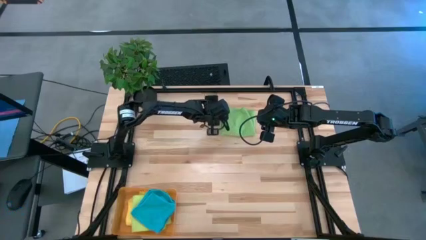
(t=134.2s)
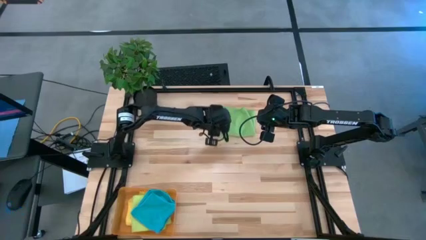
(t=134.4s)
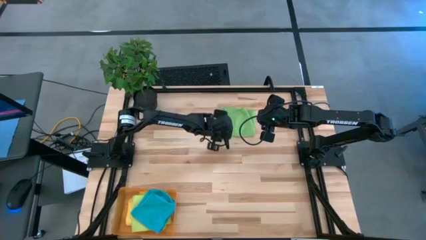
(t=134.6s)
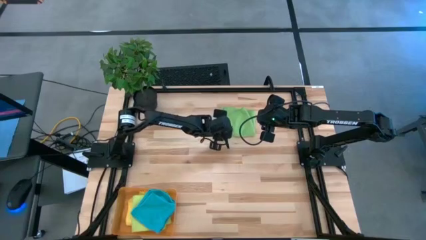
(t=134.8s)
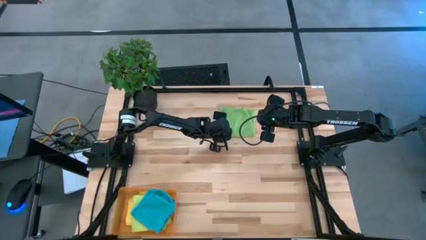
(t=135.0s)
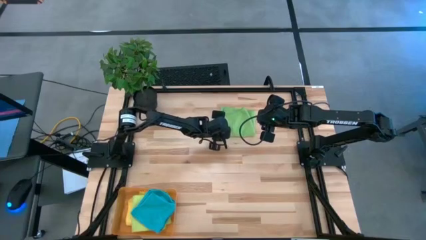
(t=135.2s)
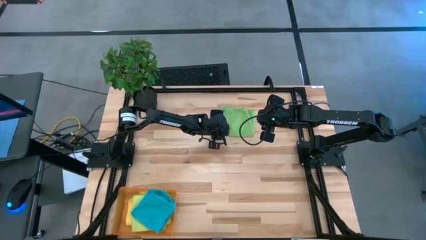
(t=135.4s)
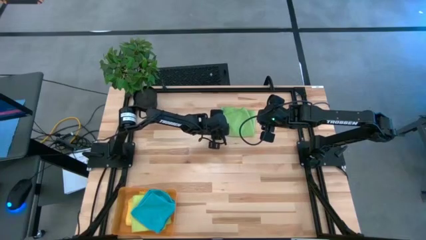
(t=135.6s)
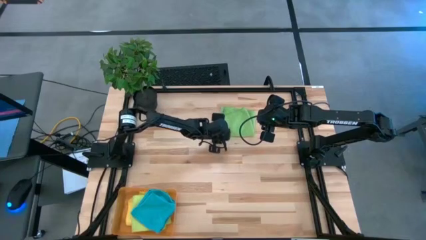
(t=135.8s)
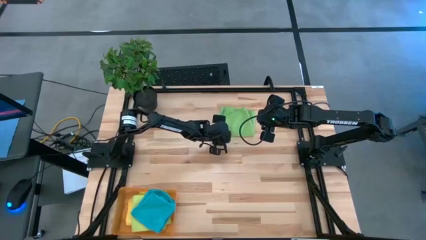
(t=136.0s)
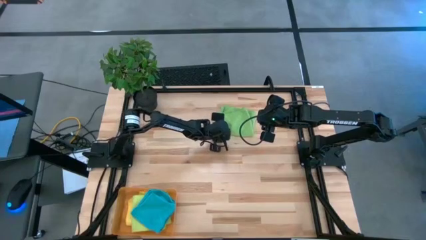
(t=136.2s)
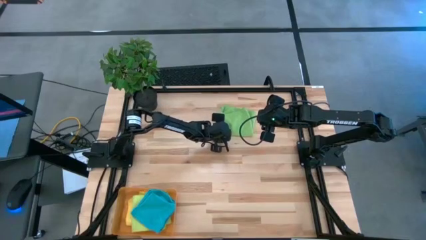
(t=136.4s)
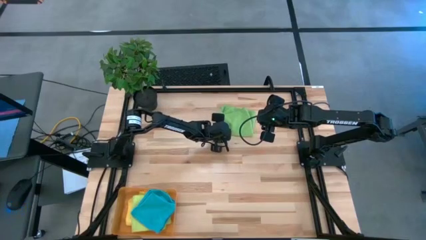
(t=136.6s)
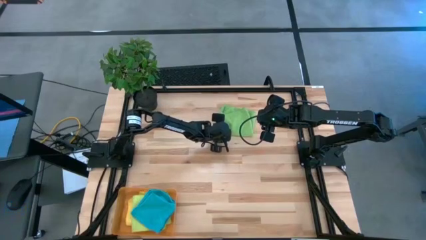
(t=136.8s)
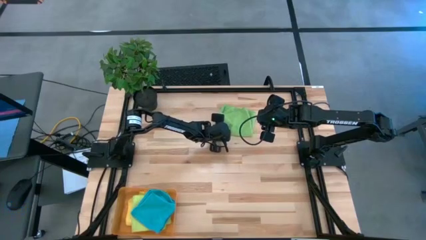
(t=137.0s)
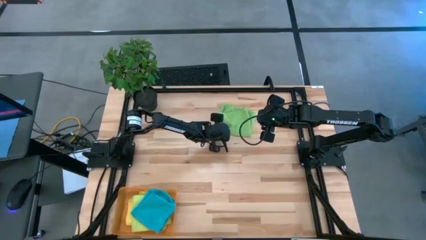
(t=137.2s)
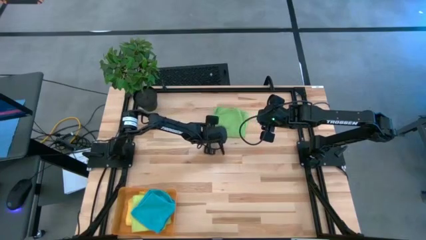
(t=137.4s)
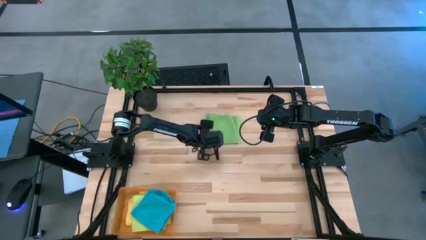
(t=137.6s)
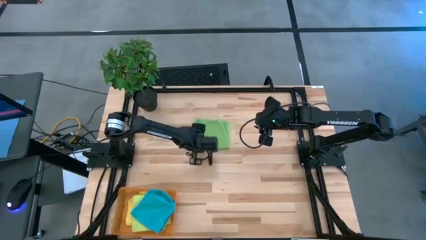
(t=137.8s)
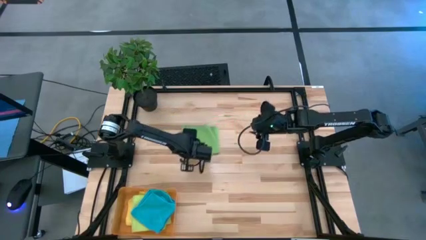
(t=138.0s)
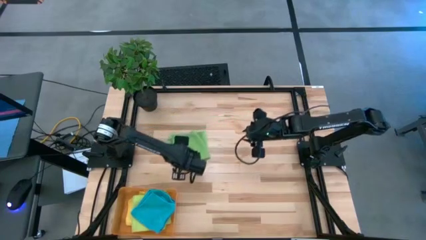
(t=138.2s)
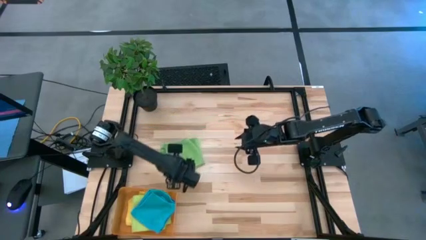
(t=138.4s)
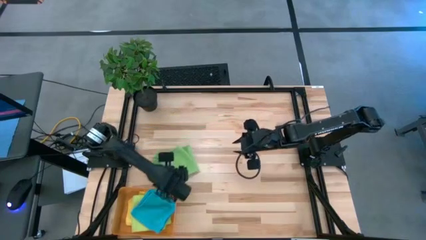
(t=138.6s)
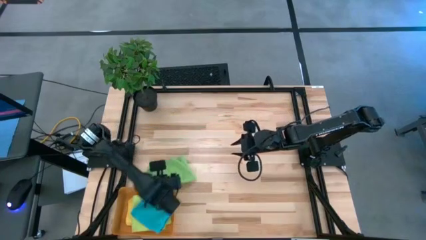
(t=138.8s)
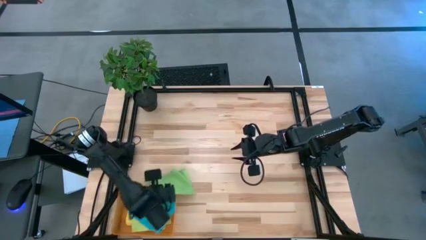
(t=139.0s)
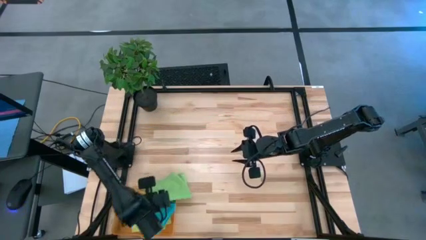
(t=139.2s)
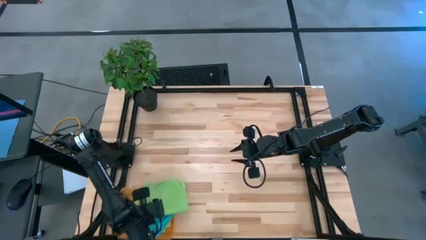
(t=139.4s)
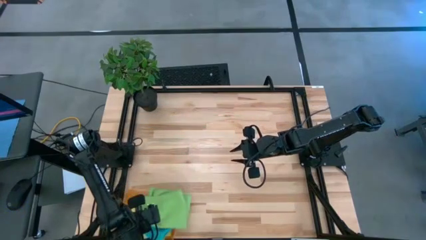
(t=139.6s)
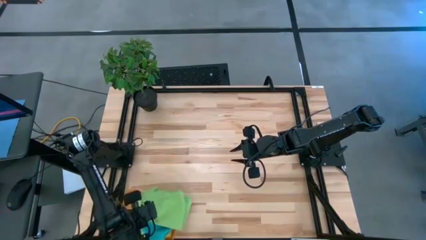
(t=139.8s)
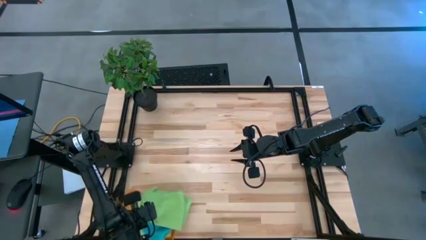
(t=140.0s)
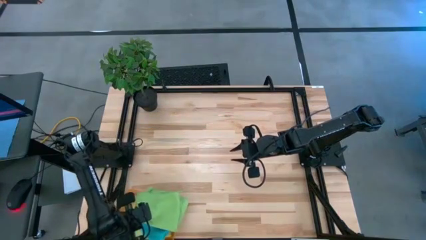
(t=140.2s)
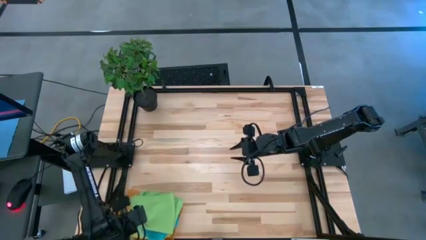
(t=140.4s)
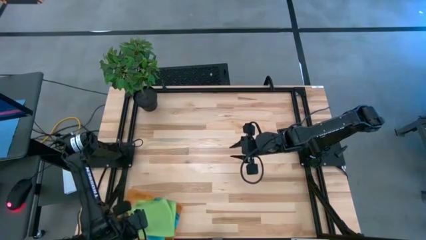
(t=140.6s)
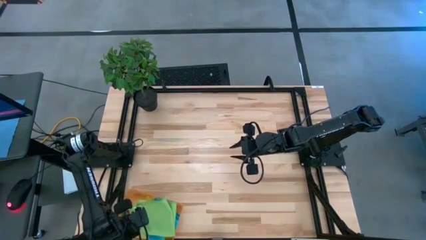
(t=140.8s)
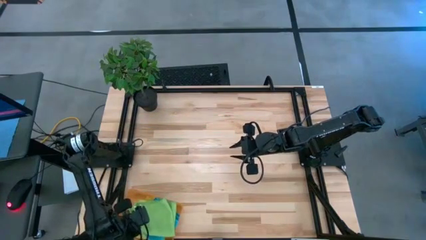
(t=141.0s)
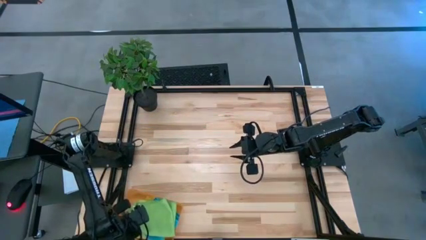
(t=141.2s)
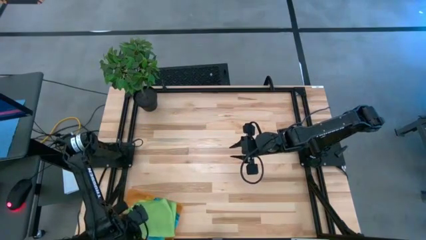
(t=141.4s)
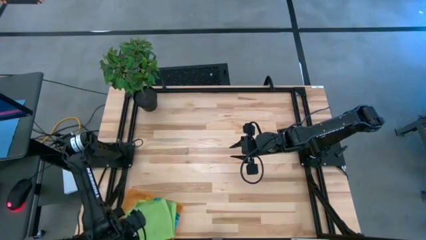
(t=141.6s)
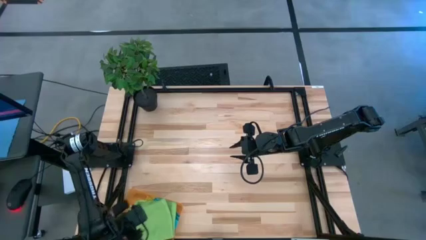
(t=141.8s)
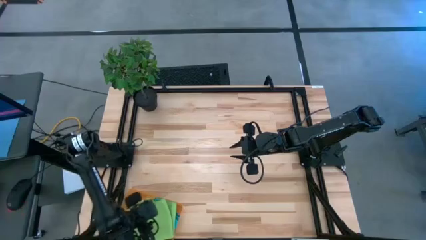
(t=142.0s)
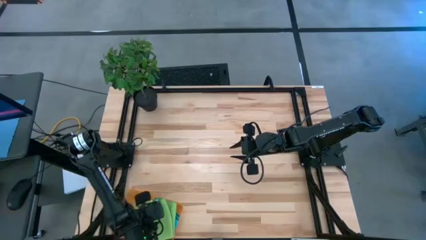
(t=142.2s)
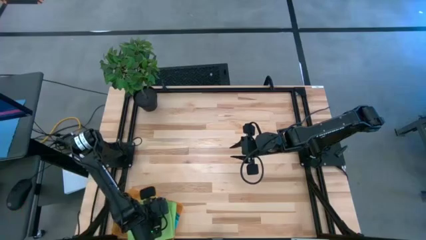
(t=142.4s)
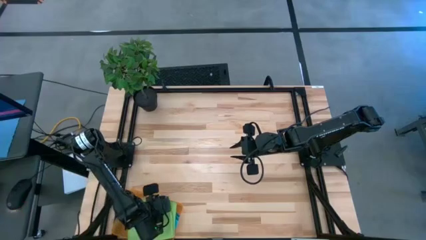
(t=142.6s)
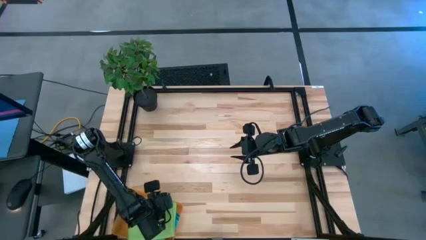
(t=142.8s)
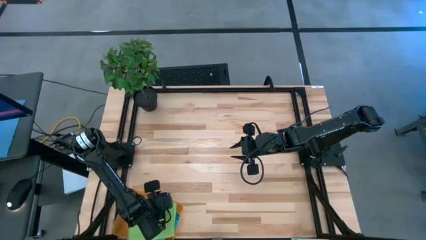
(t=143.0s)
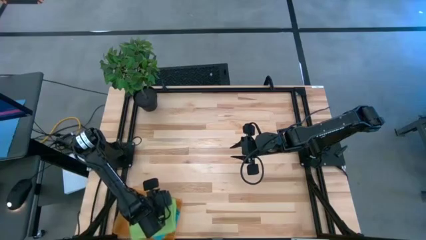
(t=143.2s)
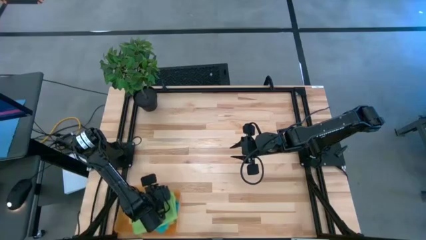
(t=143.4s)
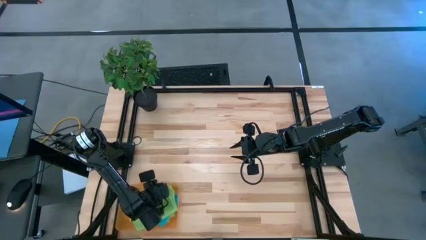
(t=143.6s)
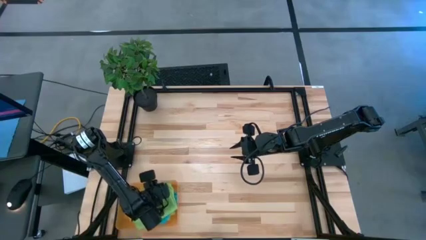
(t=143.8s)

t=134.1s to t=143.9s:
Task: Fold microfiber towels
Put the green towel into the orange bin

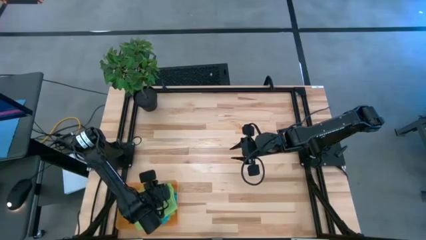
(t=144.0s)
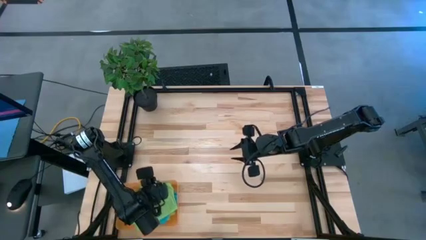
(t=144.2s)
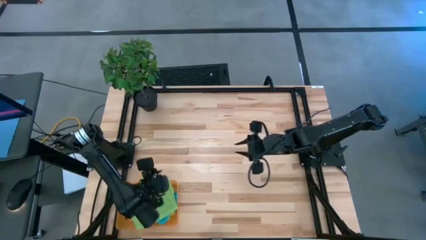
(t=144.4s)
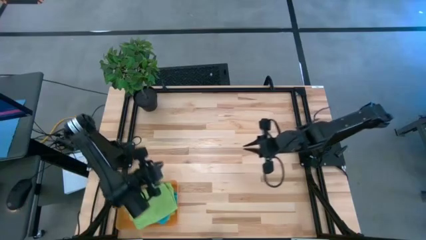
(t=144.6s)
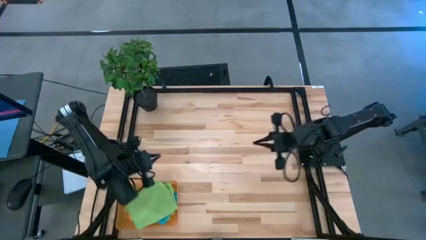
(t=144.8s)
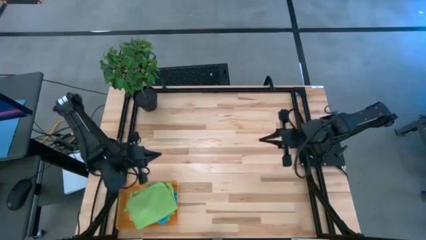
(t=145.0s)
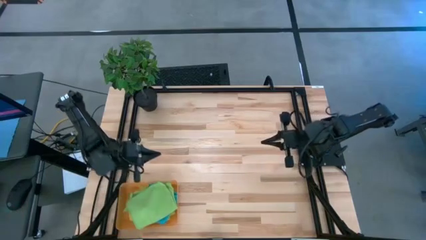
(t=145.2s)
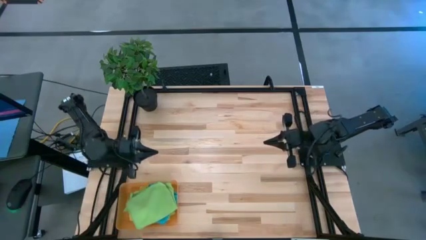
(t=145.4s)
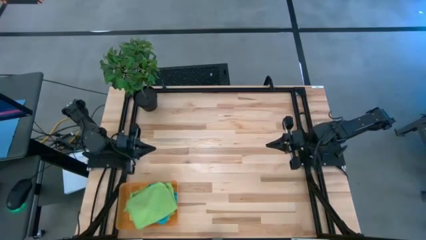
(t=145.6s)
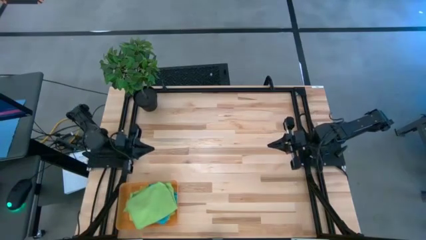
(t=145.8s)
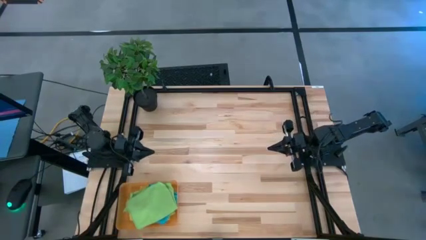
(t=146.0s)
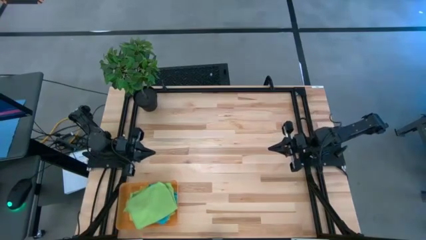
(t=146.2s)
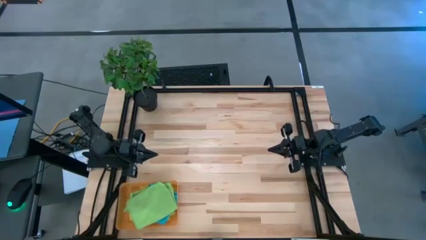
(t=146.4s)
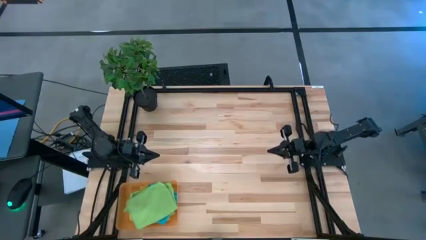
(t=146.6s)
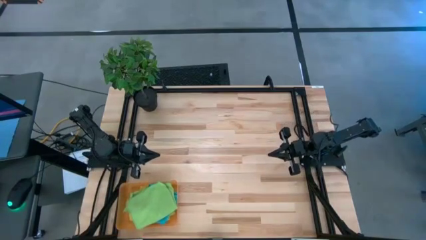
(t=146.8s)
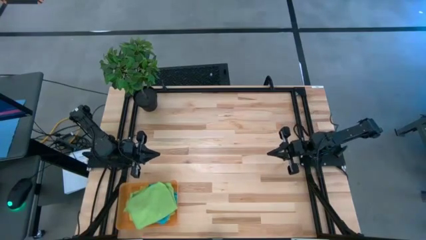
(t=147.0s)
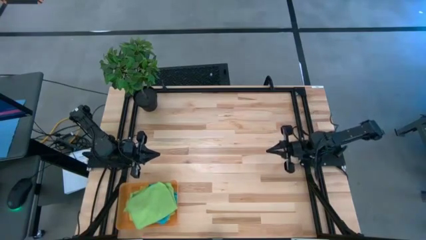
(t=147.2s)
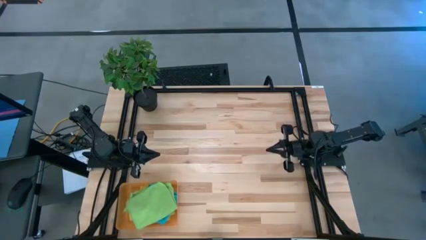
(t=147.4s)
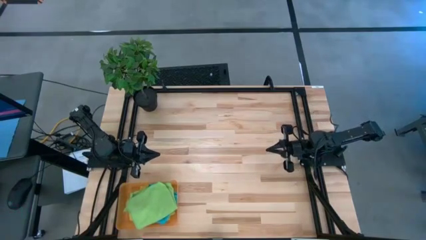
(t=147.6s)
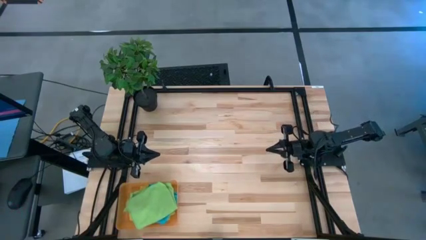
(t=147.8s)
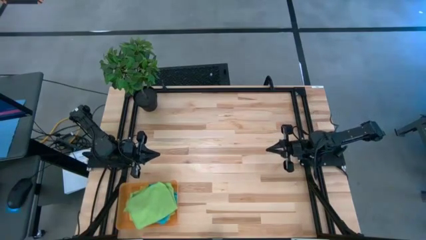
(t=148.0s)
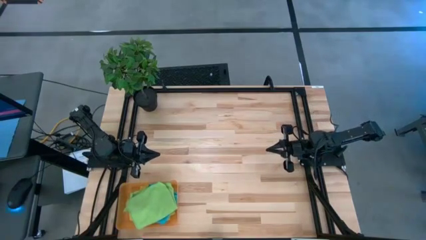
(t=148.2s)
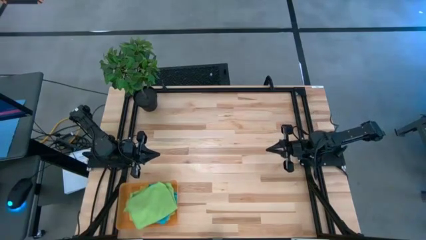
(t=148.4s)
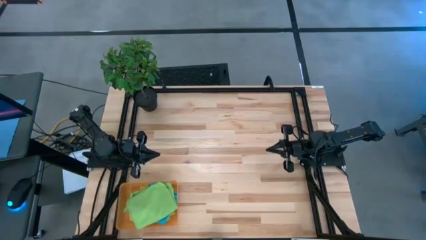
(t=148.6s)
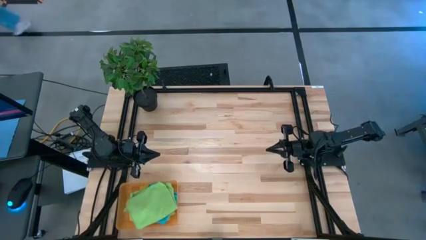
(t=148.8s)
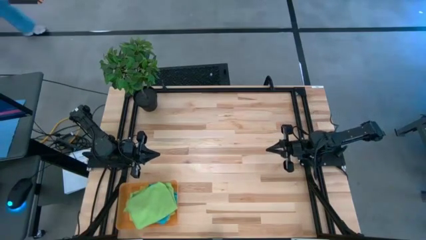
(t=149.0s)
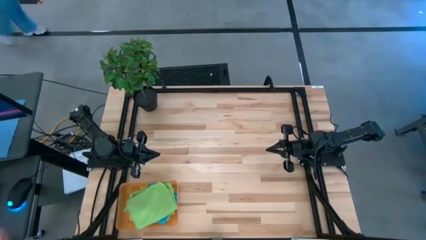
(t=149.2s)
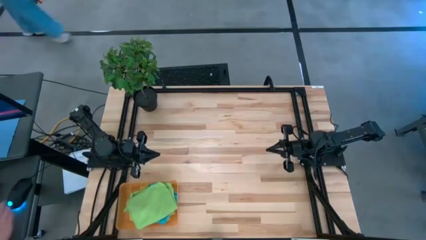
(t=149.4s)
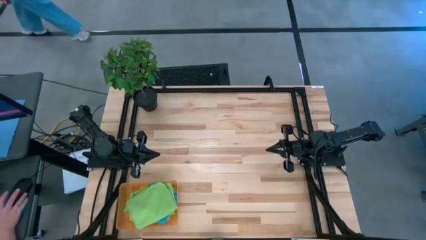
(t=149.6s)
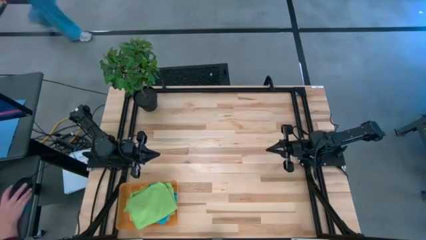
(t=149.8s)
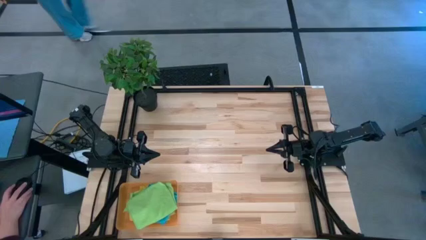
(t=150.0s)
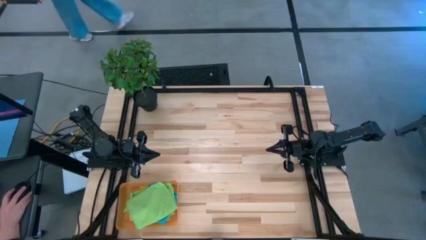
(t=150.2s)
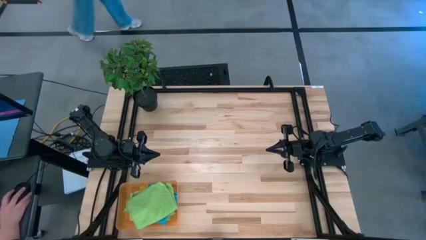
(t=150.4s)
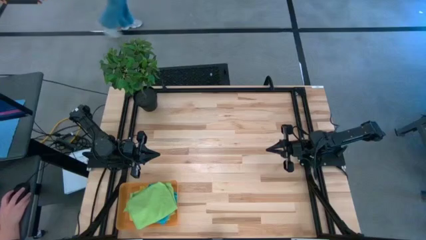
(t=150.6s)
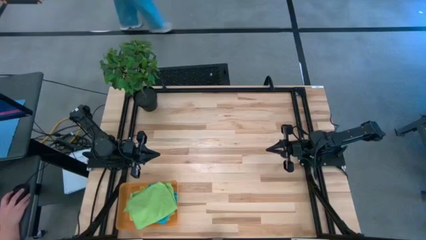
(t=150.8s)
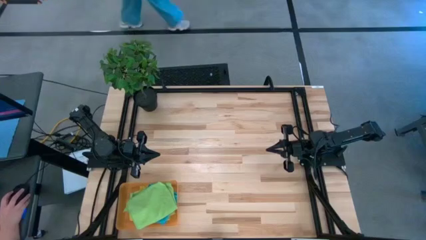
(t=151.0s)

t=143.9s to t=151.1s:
Return to Home Position
